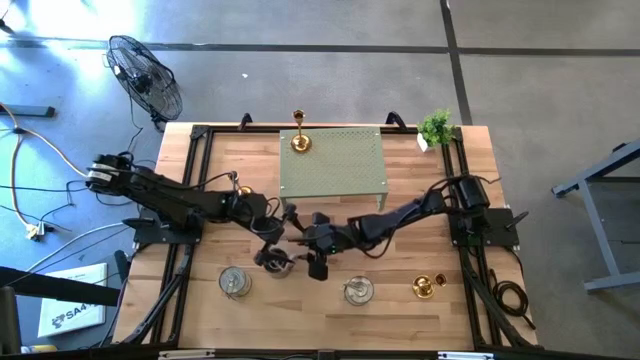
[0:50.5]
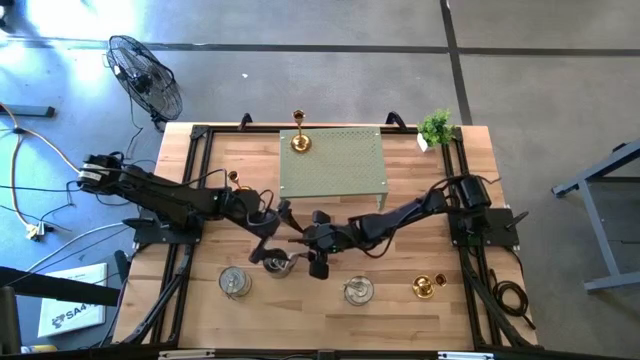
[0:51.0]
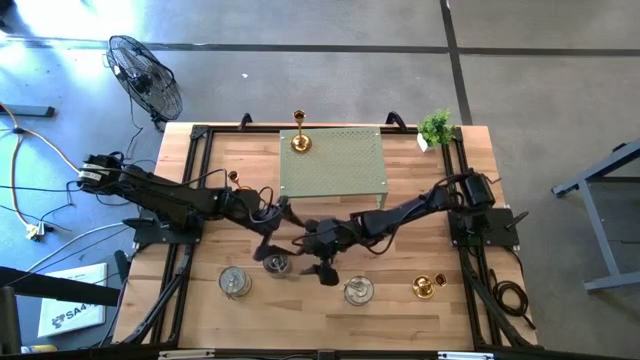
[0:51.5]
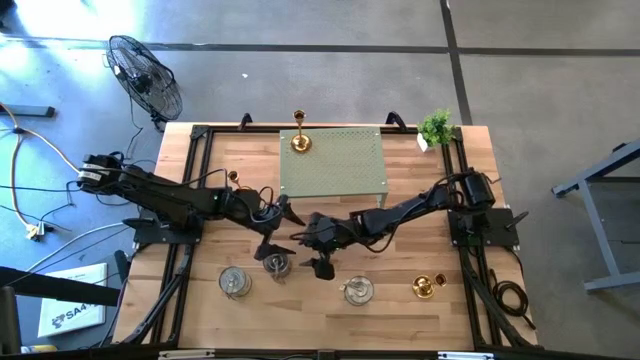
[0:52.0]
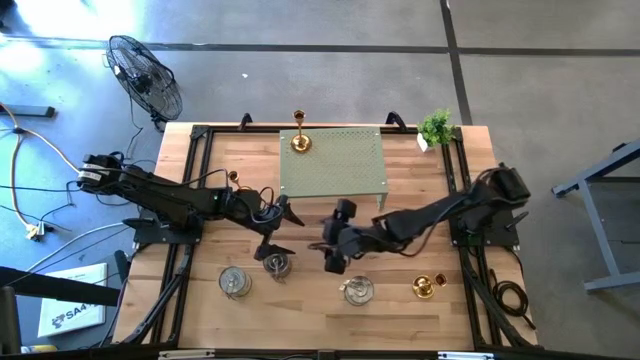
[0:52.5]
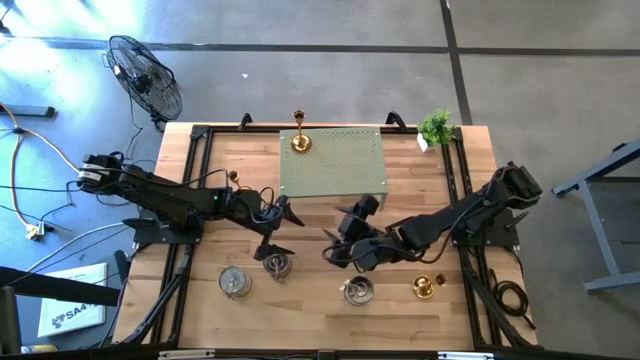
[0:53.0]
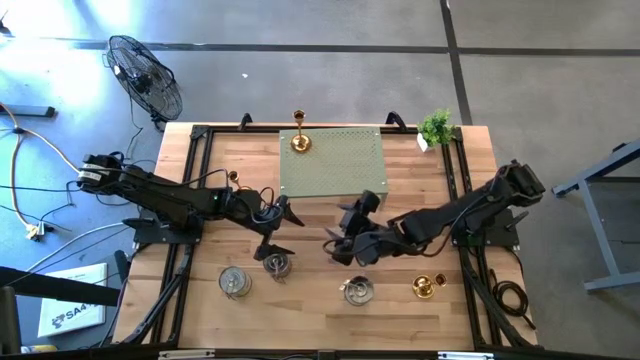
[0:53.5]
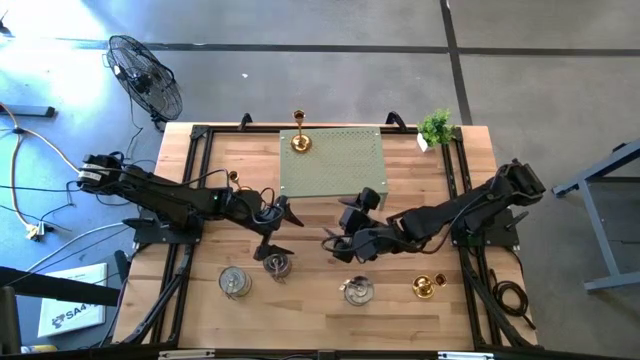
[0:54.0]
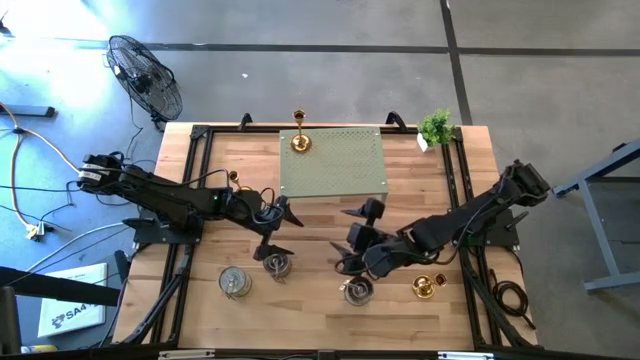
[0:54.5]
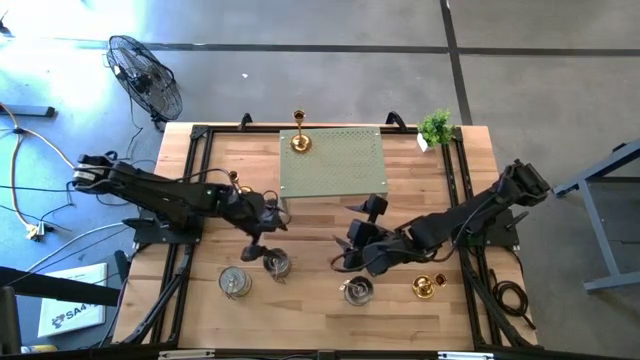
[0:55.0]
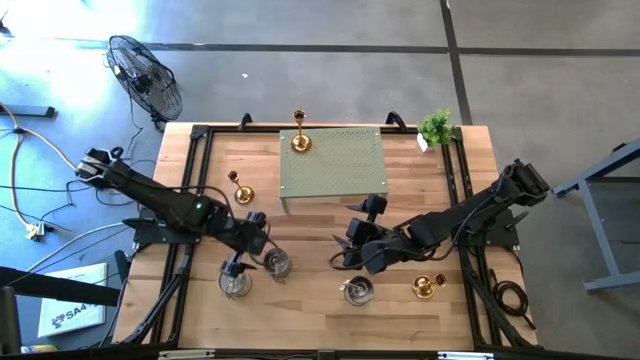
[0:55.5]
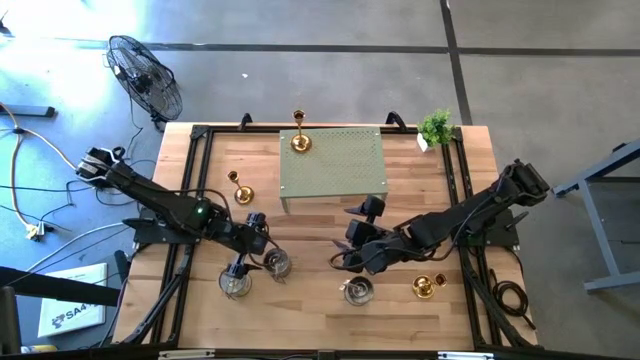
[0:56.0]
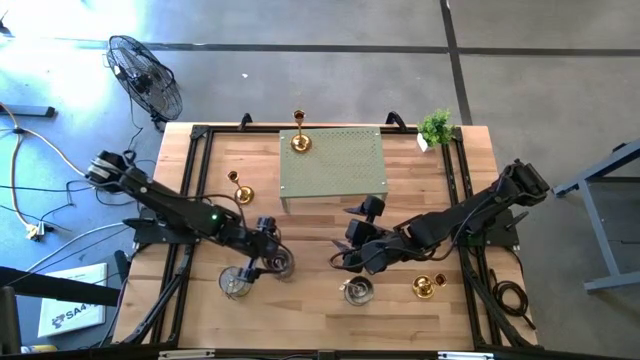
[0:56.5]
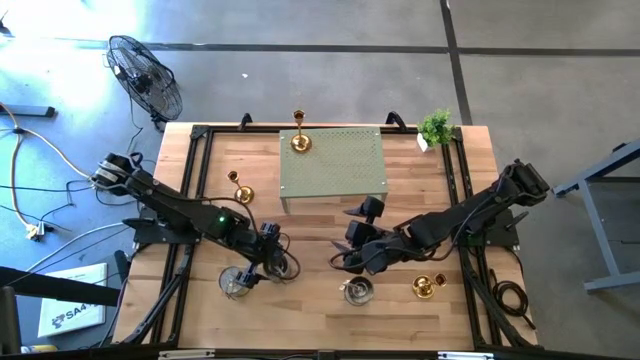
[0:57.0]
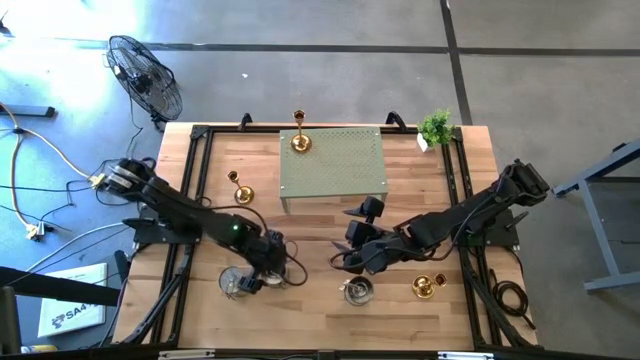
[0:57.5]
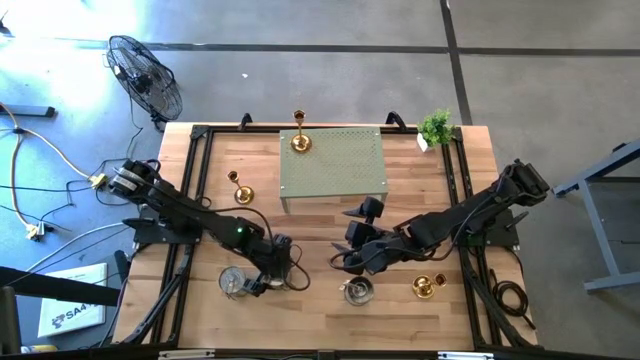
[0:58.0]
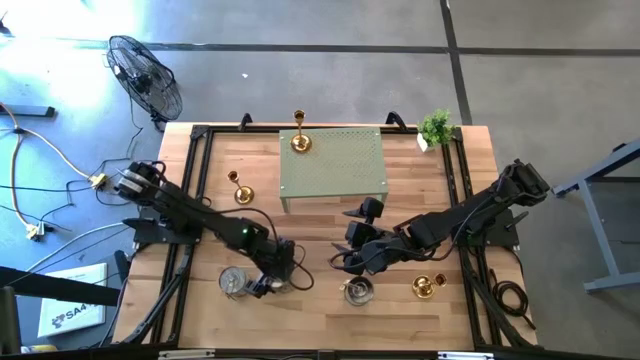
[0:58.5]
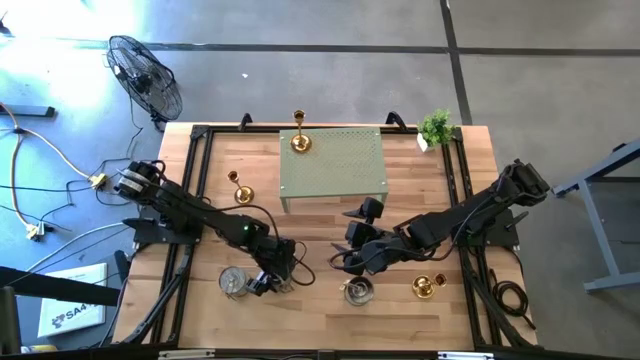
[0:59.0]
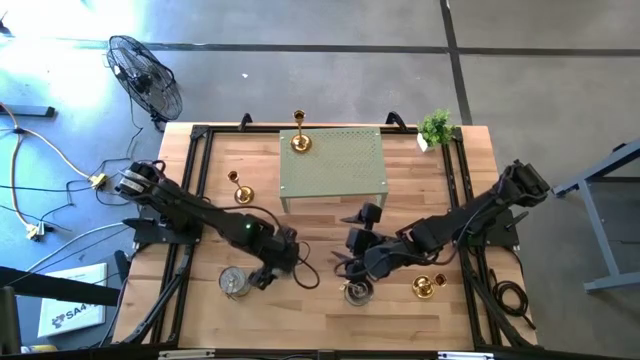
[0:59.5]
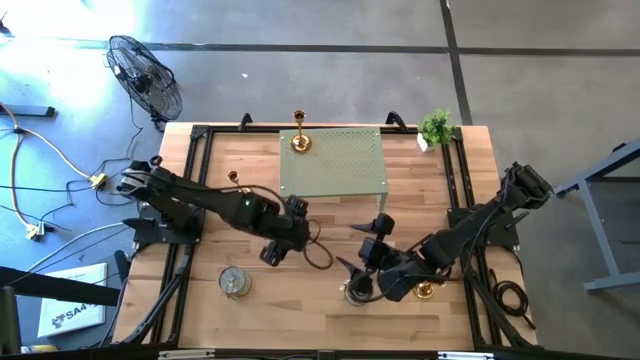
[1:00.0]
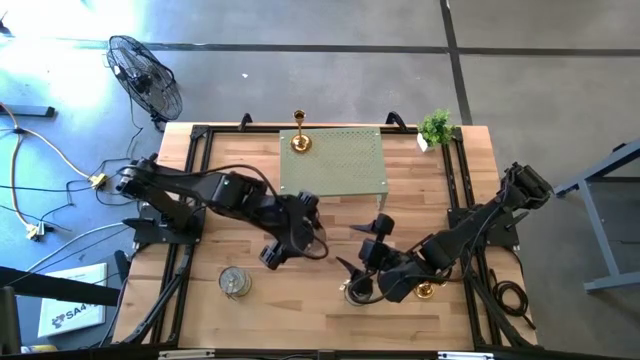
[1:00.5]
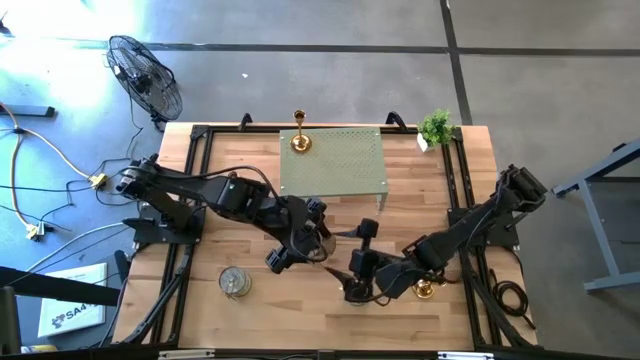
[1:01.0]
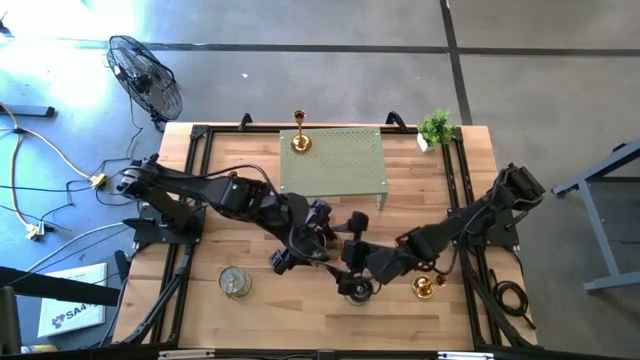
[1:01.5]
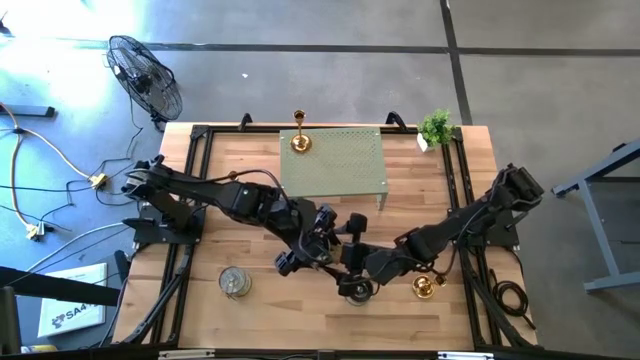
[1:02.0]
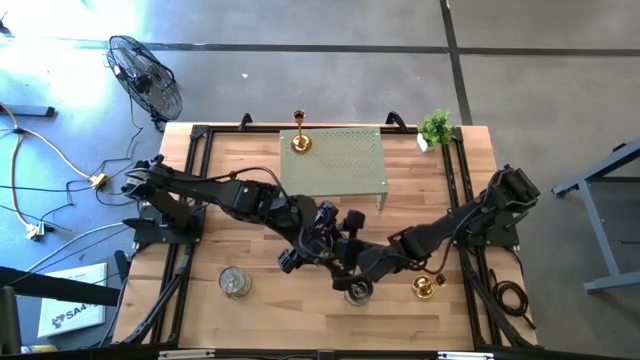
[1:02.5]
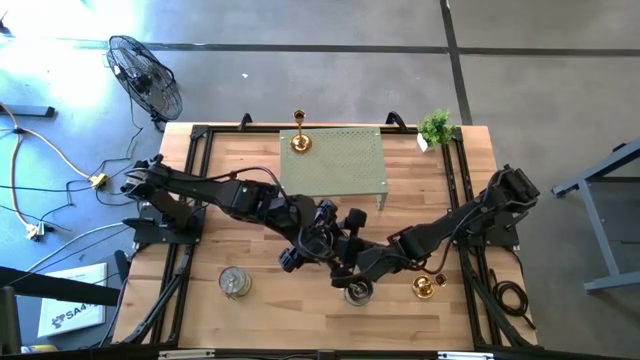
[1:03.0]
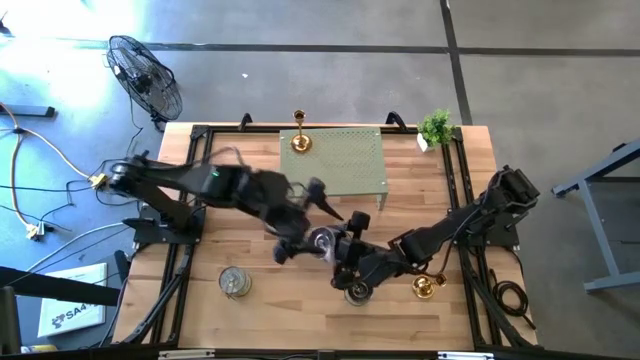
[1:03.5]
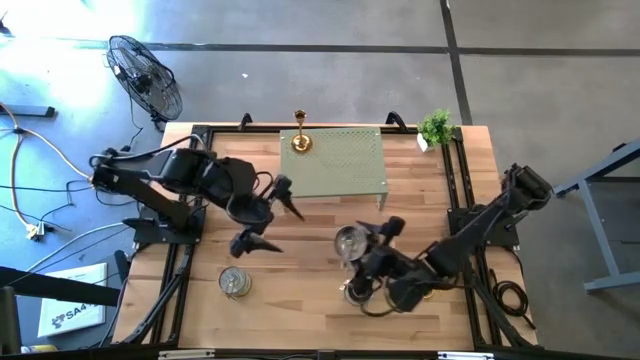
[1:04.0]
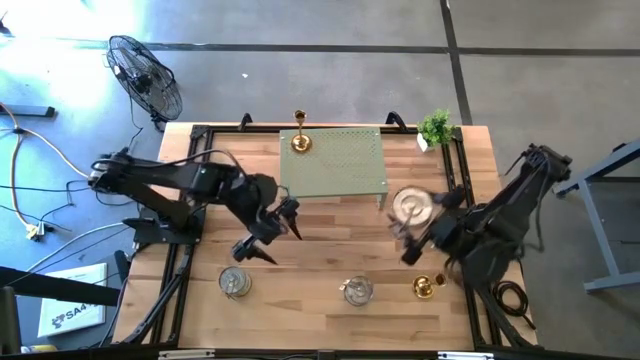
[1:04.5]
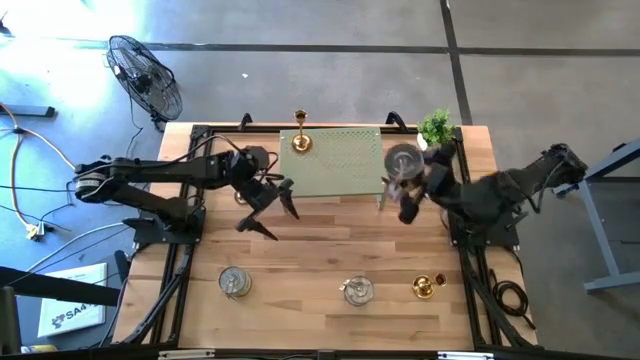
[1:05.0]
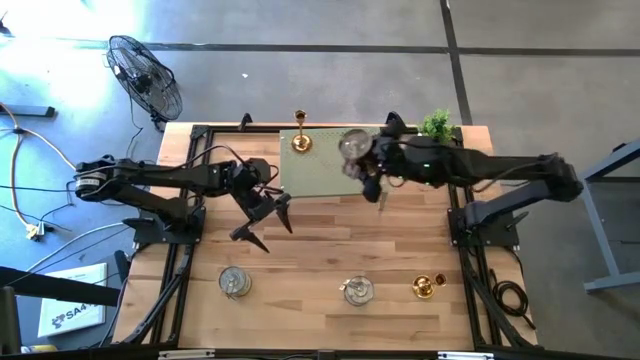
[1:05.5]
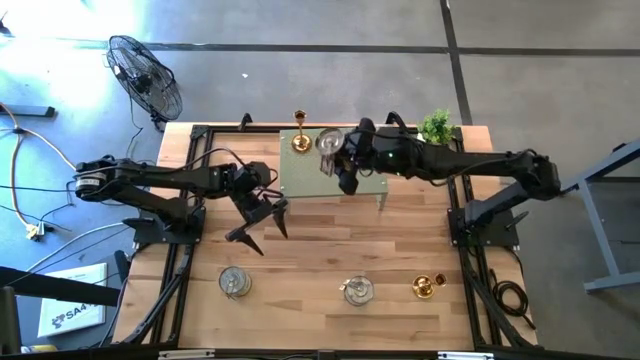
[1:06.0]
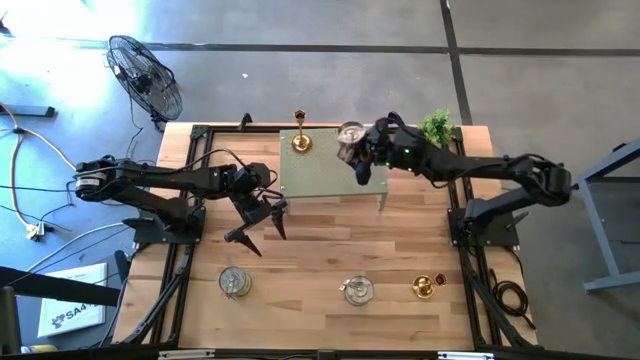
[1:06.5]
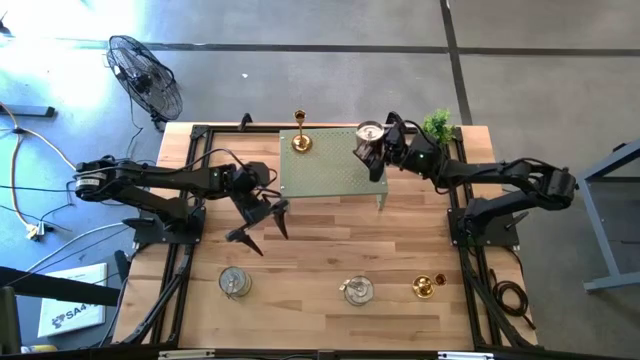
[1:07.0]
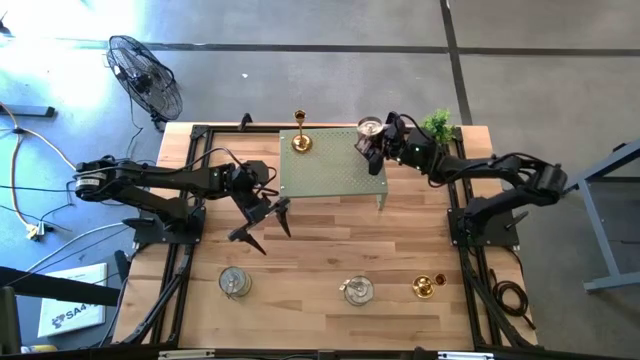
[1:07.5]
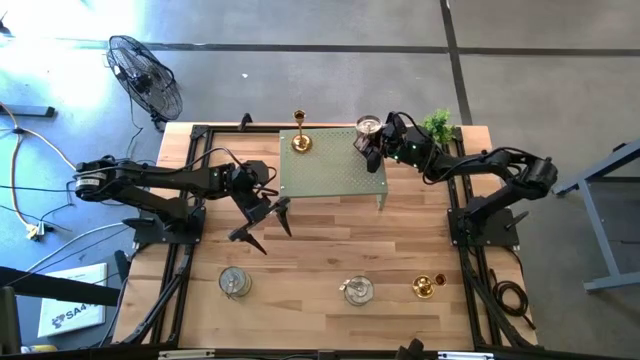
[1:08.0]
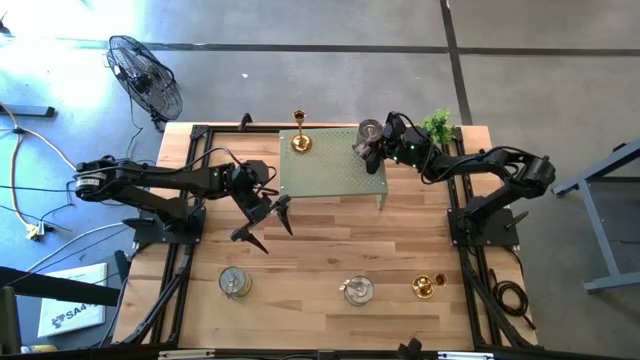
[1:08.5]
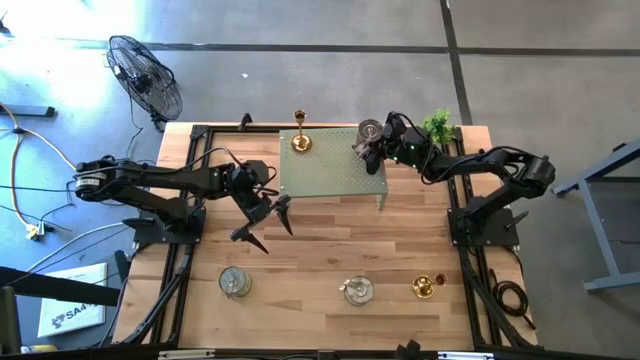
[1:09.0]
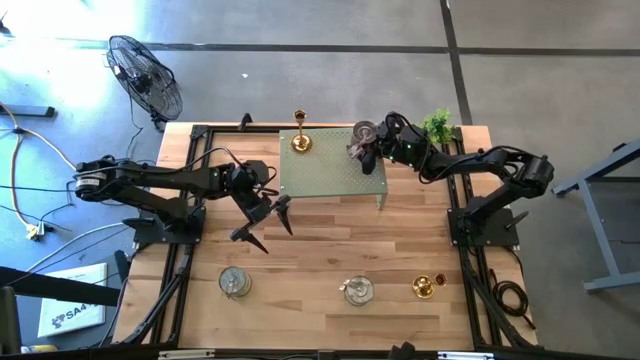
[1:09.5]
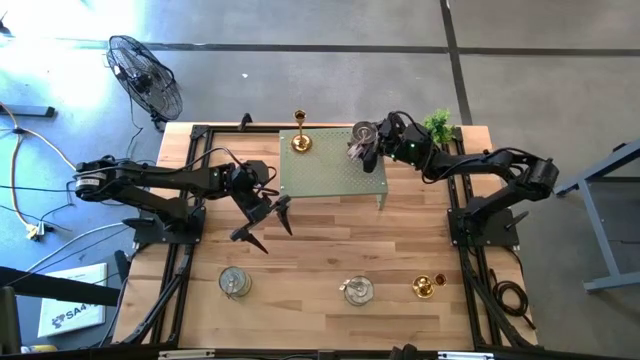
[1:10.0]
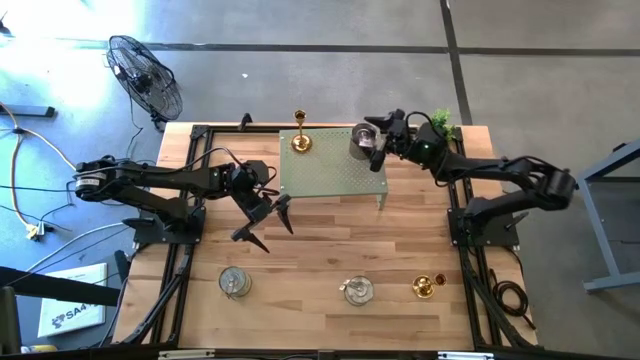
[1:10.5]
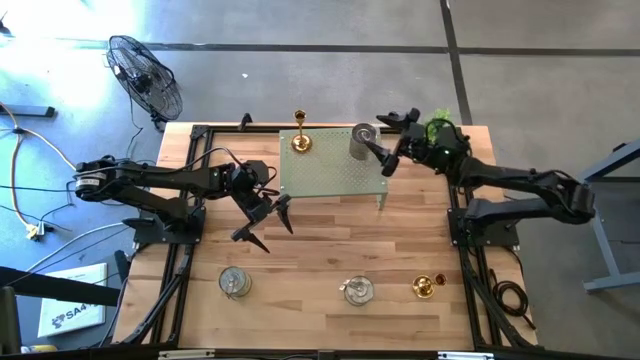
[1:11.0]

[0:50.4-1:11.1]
Task: Pick & Place candle stick holders
Put the top silver scented candle on the shelf
